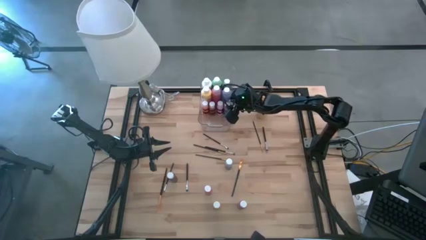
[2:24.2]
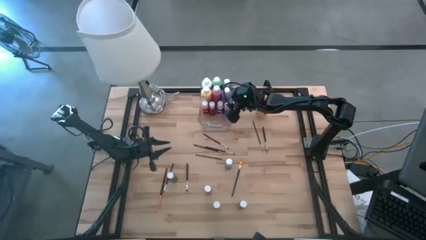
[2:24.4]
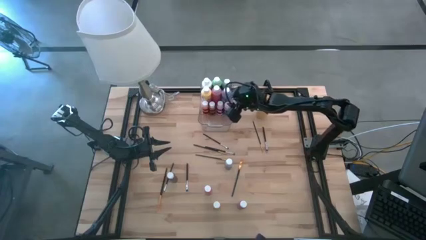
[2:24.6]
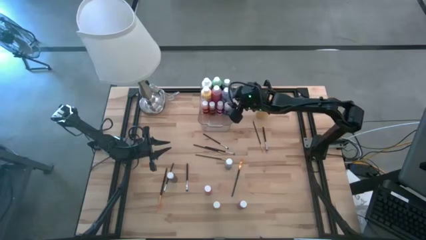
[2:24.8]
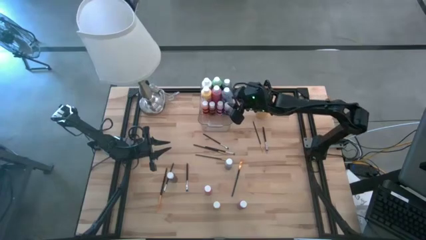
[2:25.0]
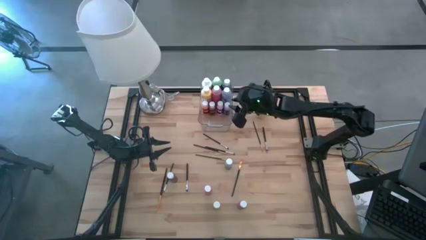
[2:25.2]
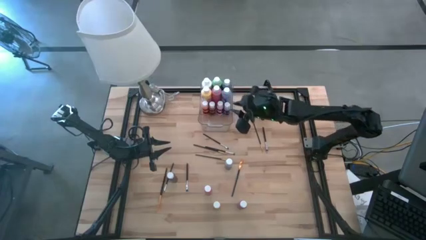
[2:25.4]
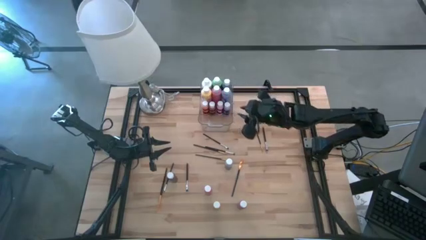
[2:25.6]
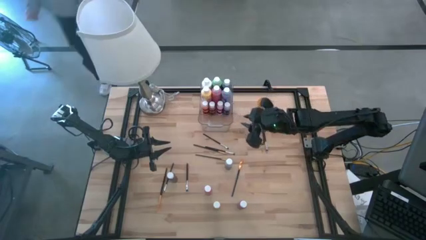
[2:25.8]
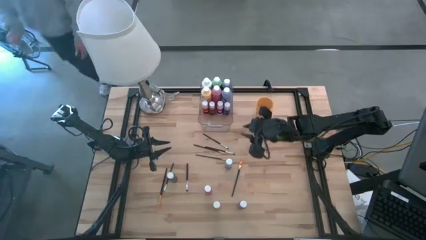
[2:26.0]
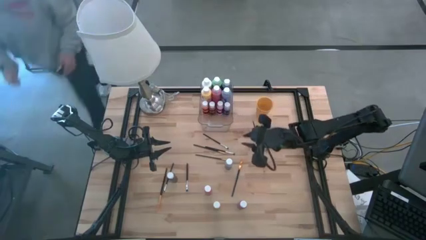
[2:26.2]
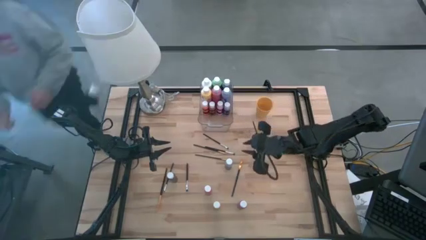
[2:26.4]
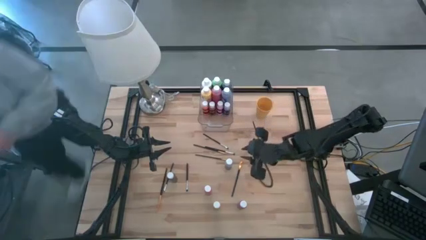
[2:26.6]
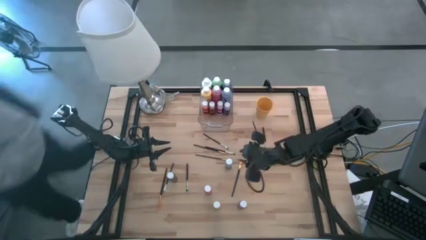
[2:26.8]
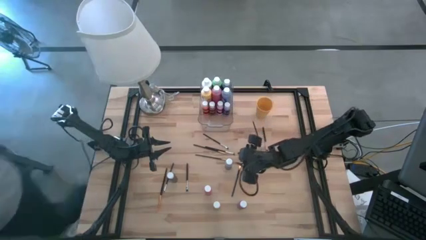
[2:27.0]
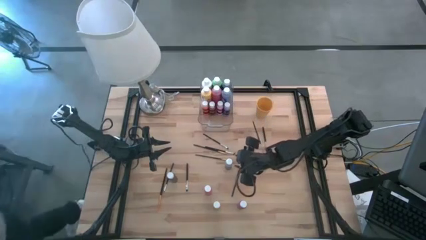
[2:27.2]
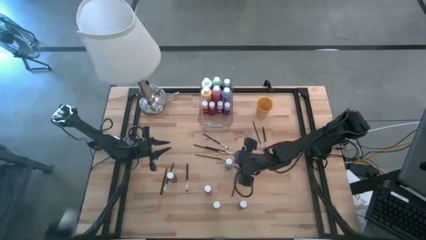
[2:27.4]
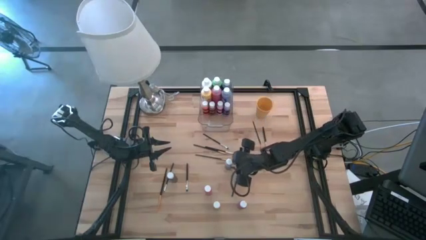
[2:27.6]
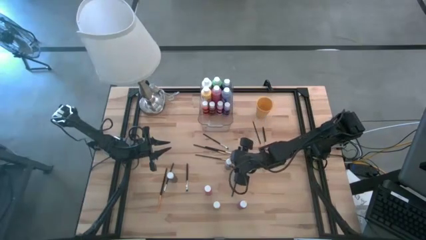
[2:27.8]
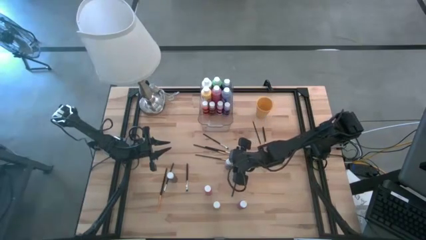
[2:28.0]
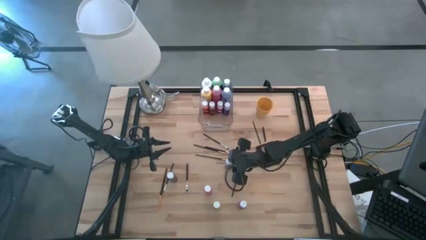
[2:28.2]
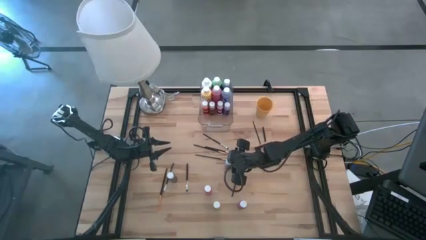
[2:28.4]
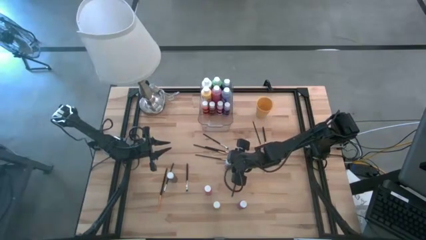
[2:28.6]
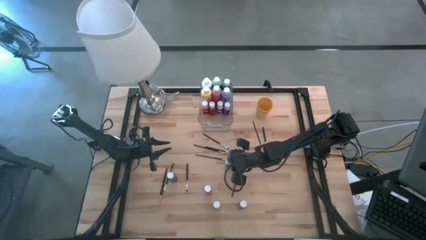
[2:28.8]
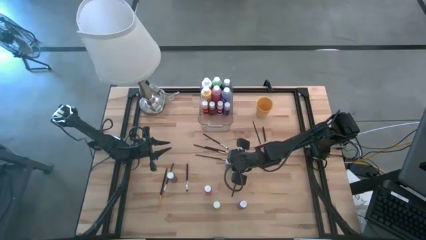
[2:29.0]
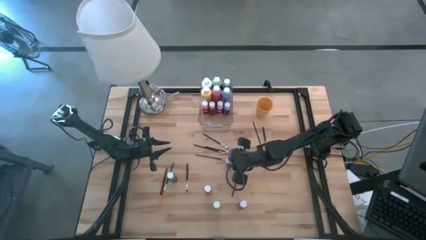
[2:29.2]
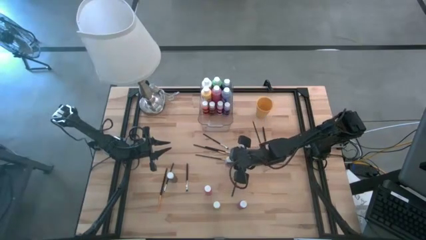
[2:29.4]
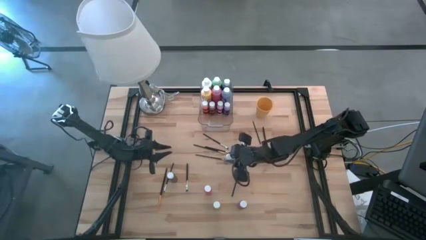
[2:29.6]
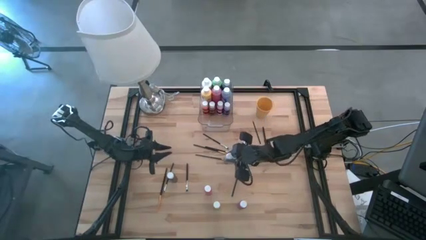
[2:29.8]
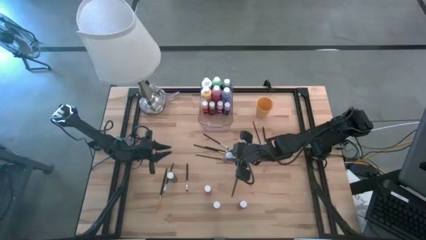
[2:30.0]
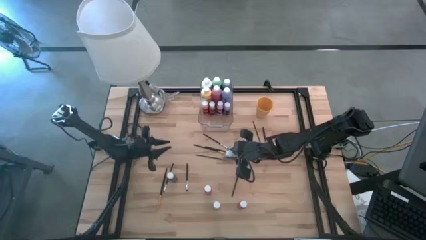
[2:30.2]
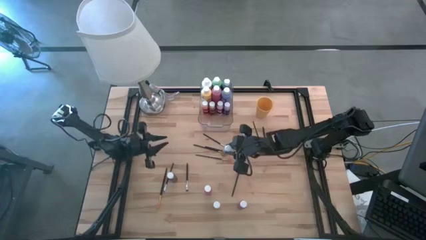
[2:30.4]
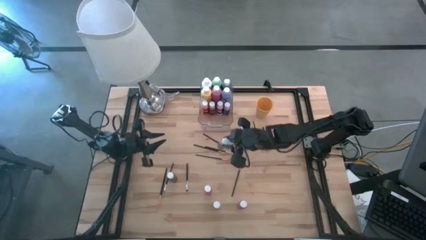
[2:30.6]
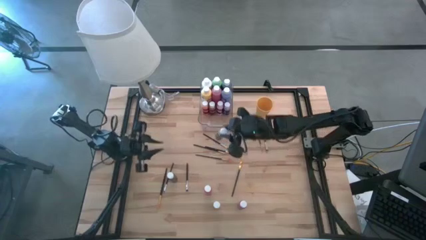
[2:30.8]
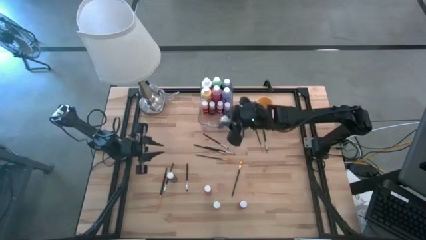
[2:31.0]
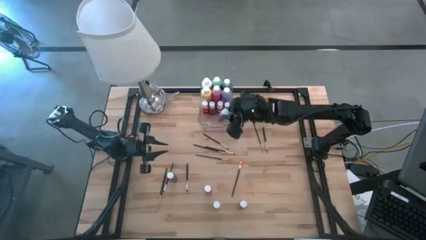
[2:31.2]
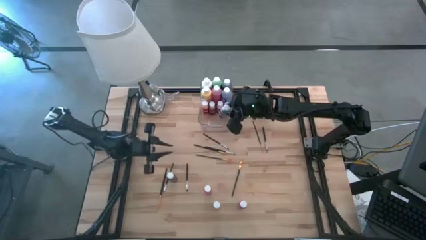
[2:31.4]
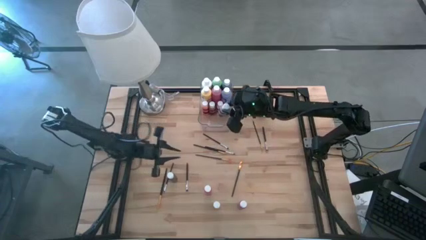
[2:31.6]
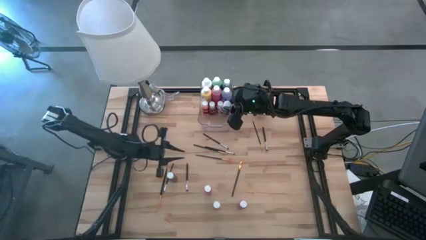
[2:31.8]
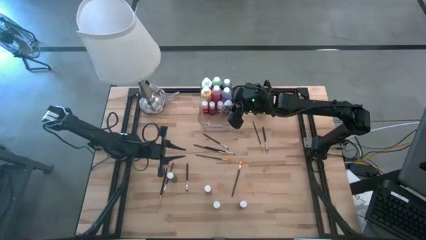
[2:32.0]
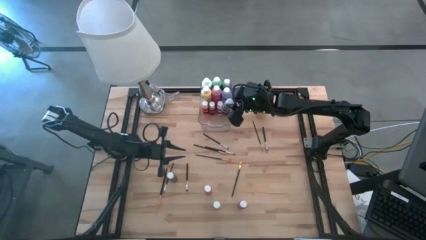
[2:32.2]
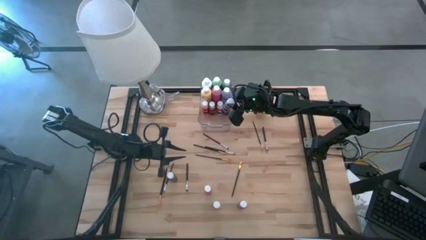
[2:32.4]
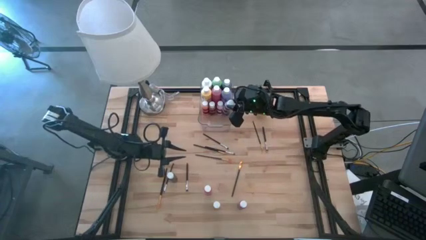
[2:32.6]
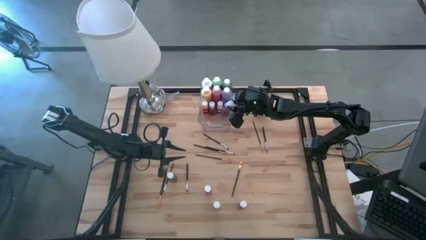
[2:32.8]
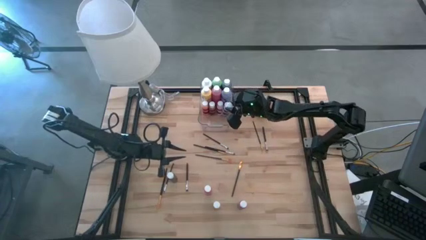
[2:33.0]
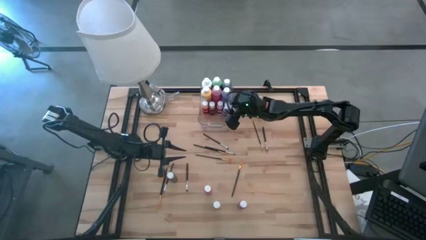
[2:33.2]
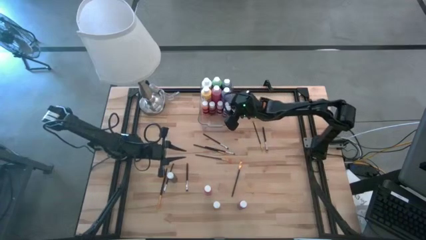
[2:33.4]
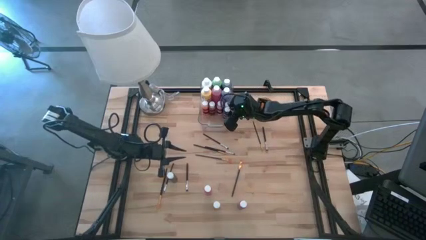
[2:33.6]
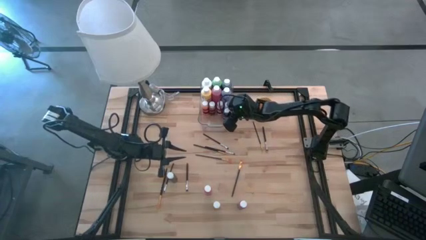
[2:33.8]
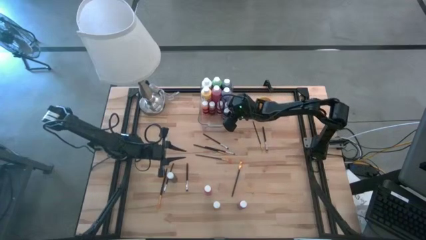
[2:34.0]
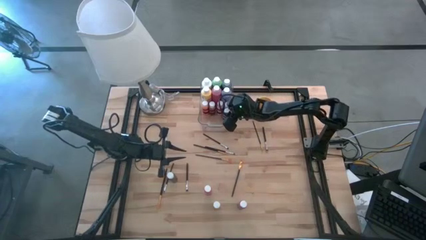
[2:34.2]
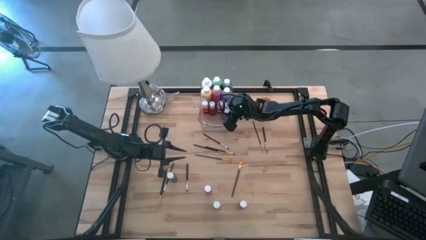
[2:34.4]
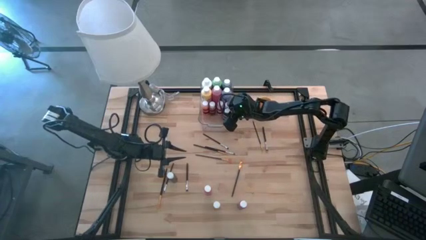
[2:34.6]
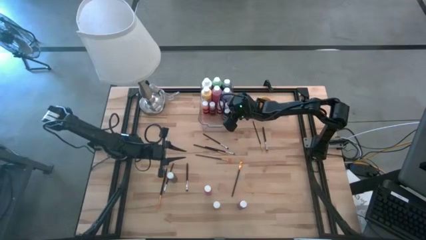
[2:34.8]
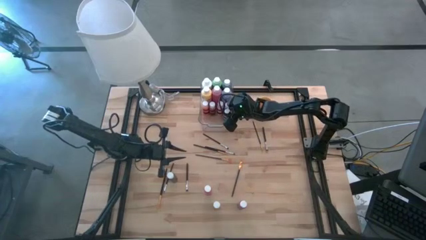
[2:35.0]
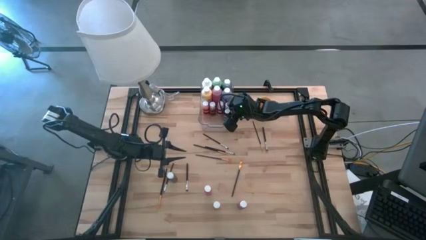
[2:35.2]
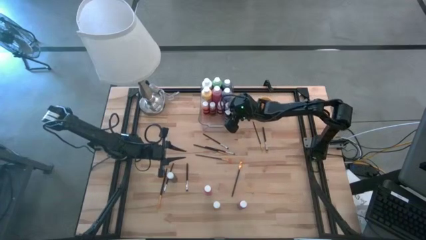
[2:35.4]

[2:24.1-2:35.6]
Task: Pick & Place Paint Supplies
Put the small gray paint bottle into the bin

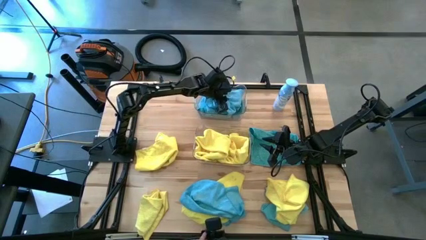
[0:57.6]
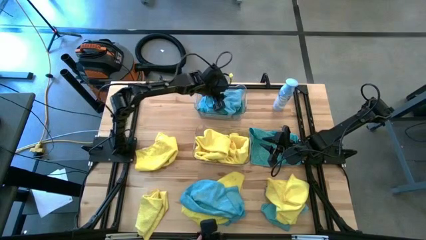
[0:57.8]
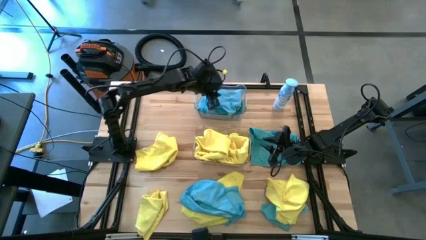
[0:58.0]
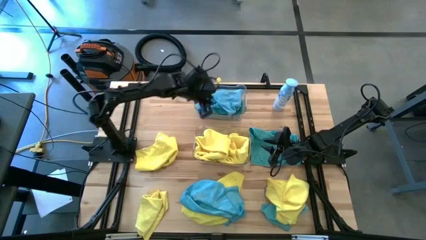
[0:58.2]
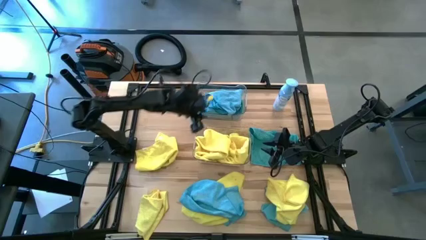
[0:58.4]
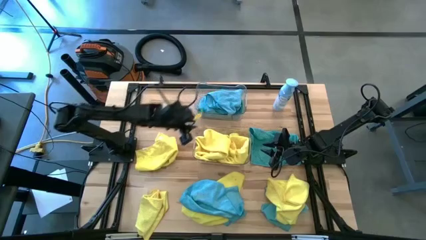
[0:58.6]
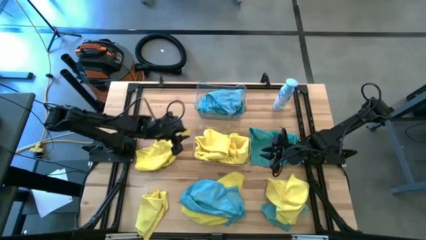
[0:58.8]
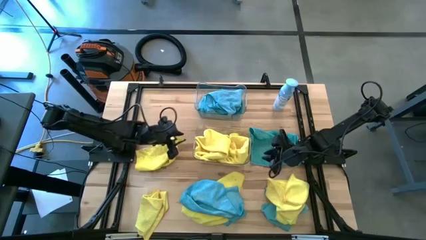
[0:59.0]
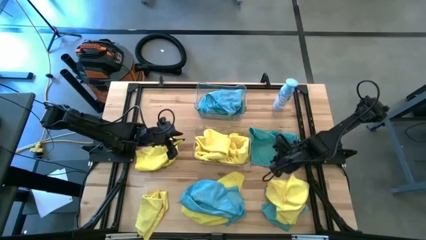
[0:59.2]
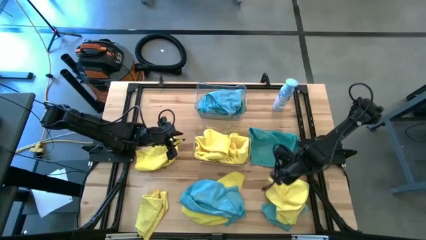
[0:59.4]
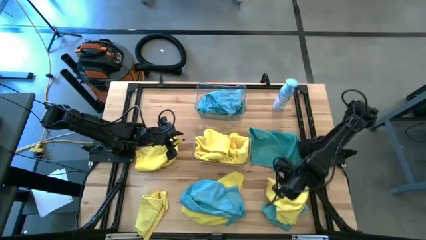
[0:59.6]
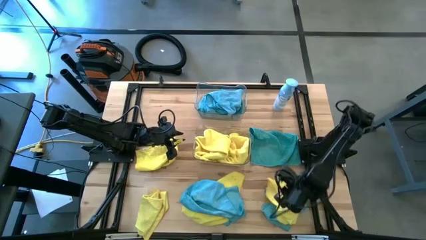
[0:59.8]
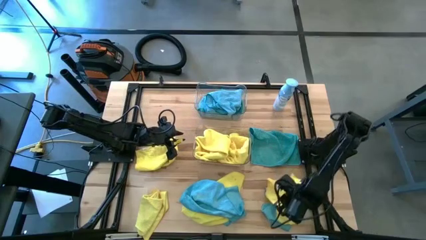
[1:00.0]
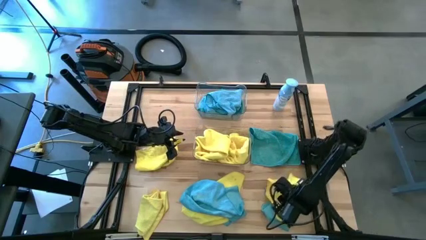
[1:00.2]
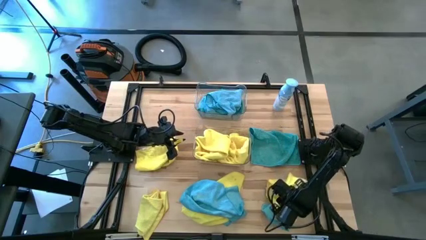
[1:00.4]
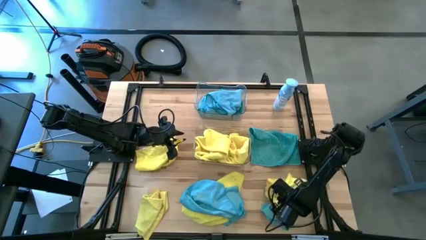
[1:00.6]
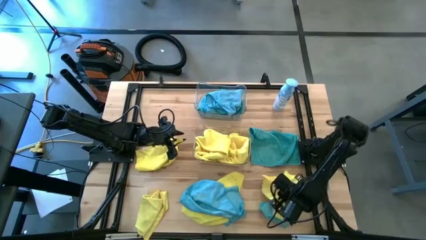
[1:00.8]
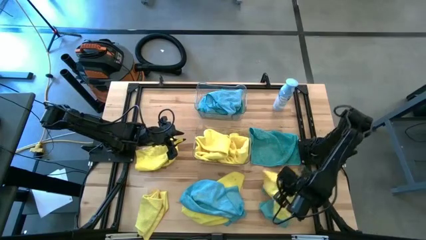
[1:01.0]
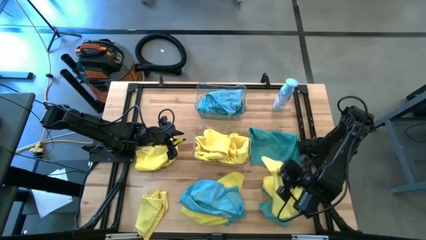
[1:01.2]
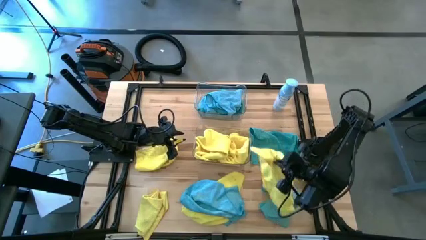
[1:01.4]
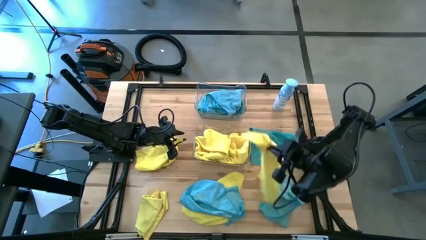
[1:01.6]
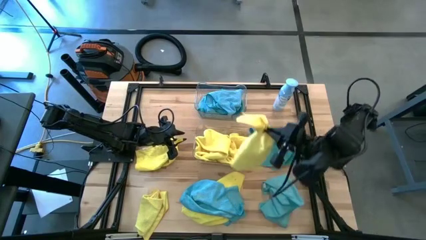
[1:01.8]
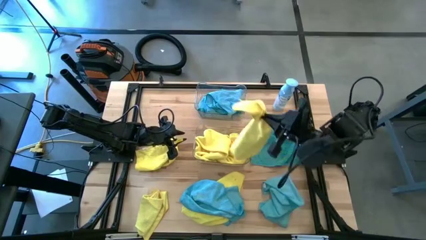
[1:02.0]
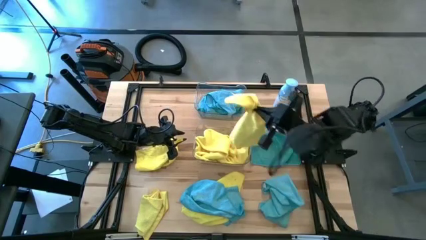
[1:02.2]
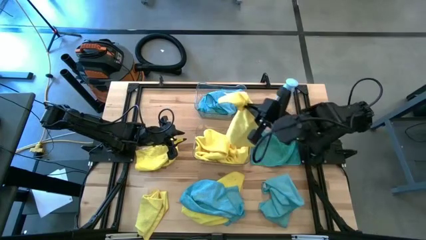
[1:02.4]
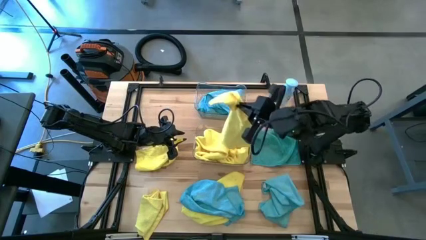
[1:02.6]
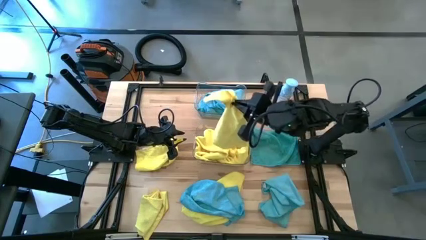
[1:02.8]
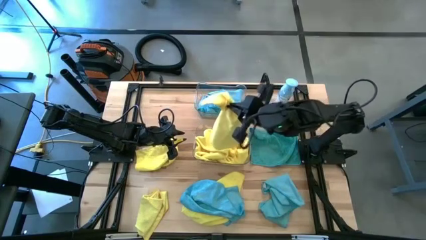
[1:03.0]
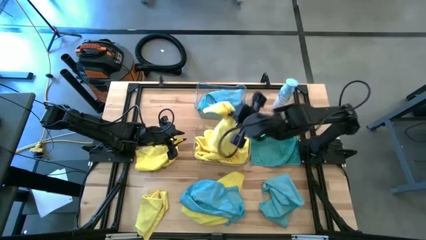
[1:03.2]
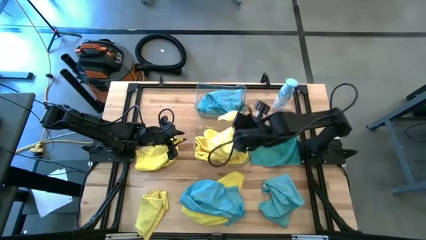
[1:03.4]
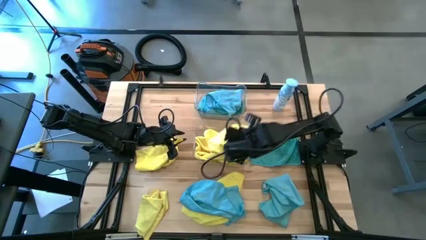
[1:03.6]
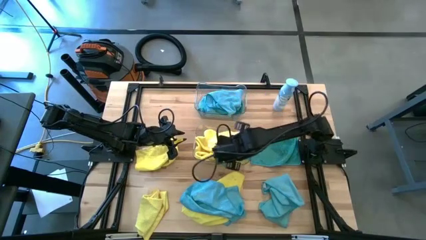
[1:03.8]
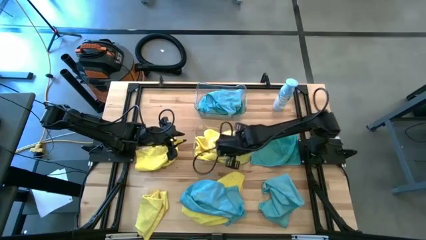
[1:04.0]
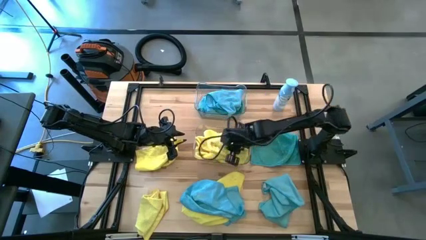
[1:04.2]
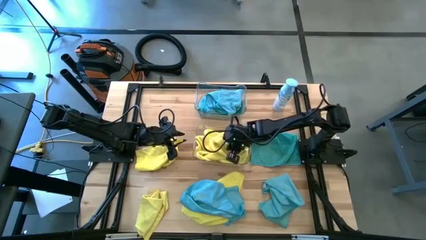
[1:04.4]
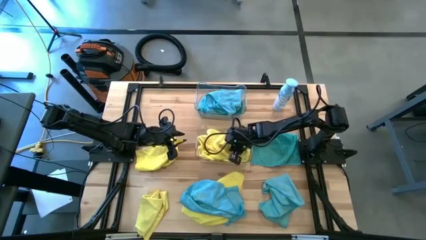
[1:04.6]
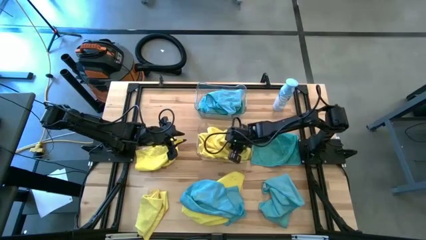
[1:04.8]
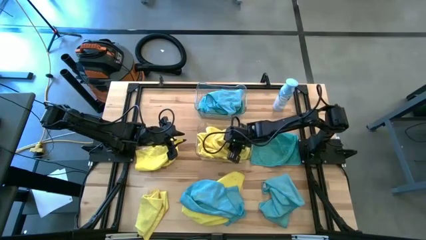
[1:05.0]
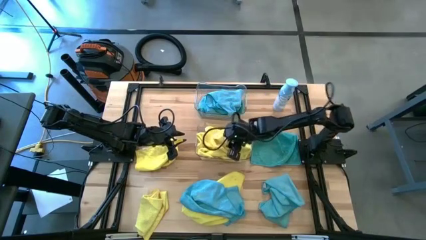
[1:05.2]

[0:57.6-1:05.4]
Task: Sort microfiber towel by color & place in baskets
Put the yellow towel into the bottom transparent bin
